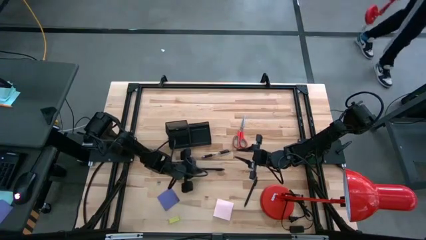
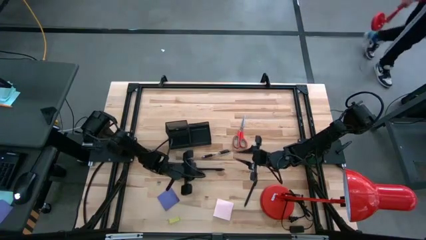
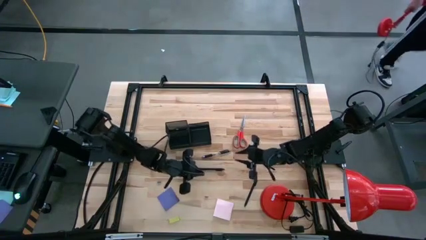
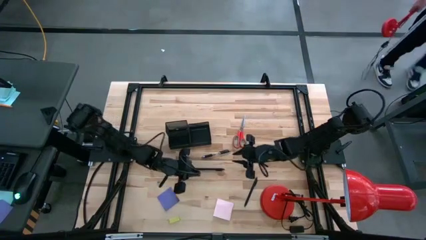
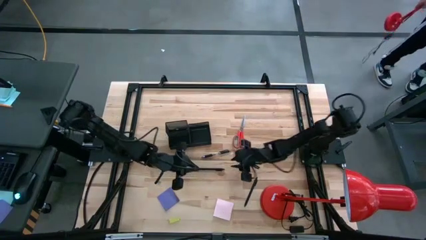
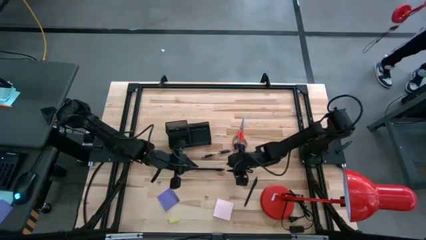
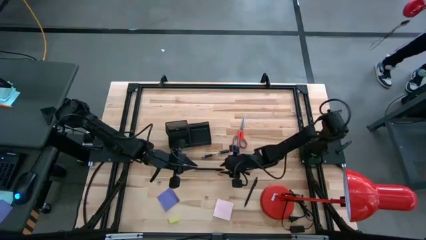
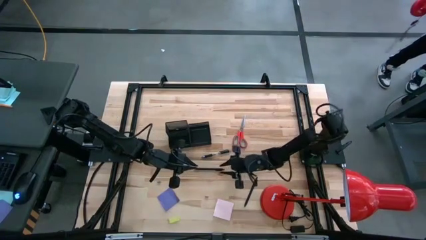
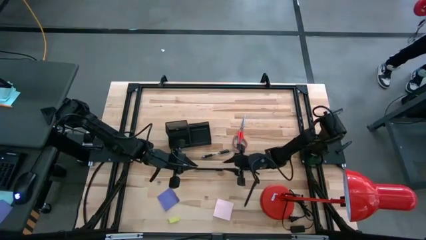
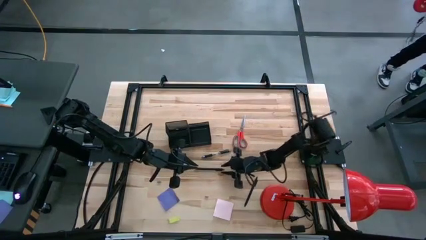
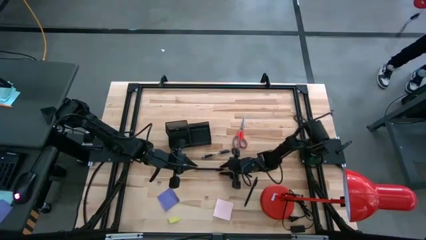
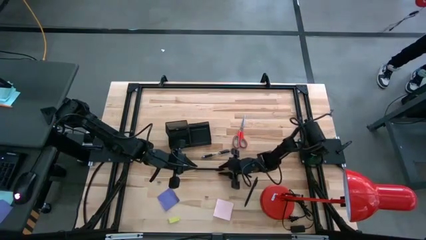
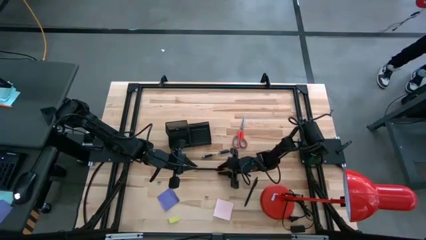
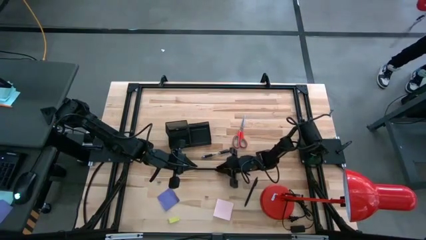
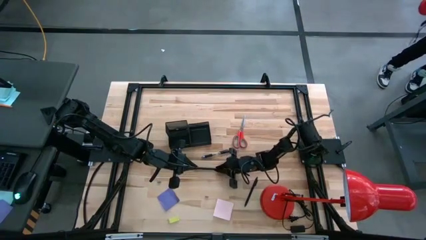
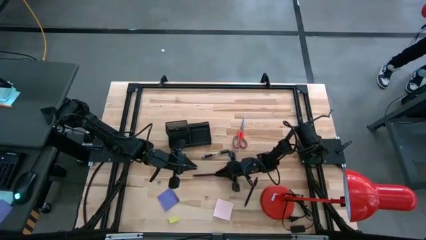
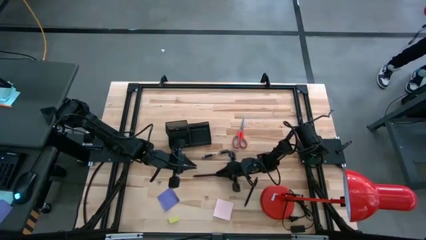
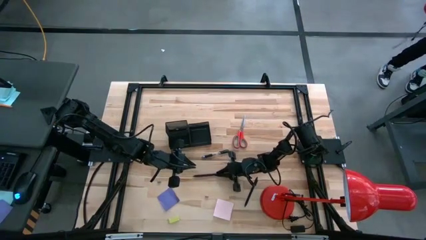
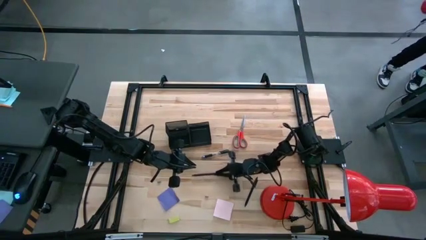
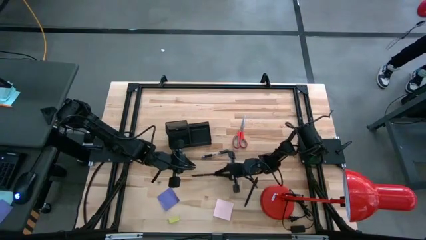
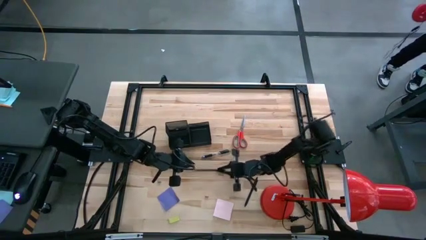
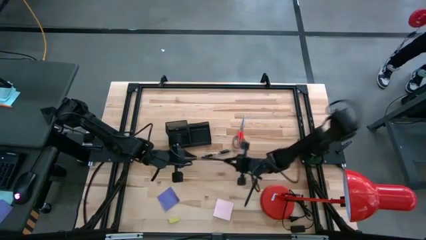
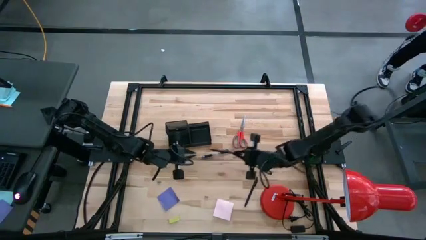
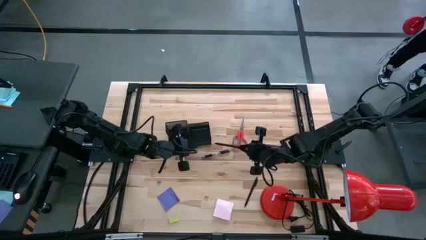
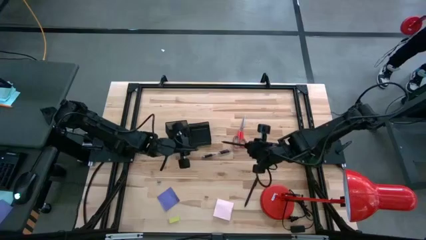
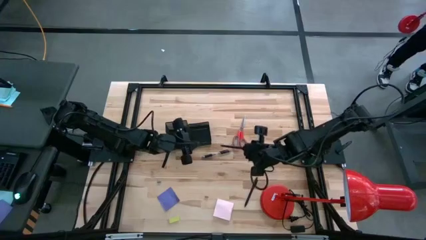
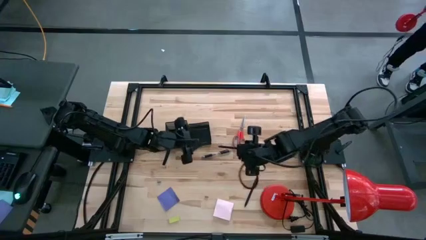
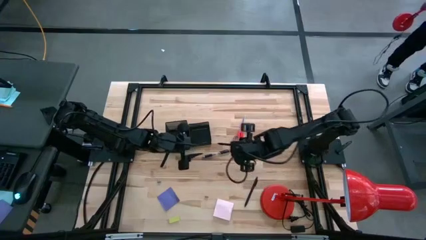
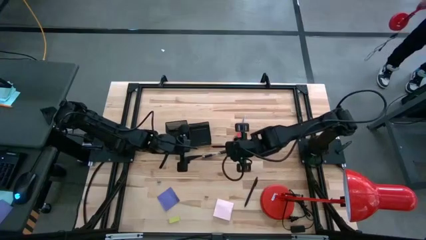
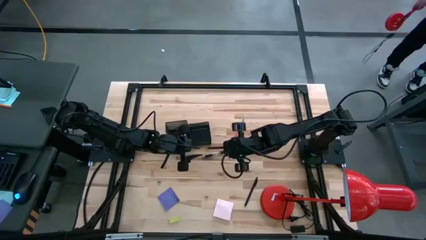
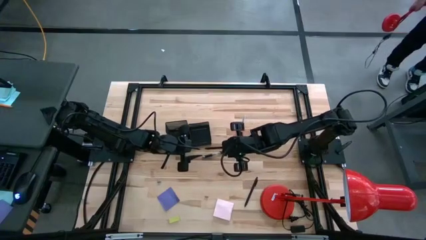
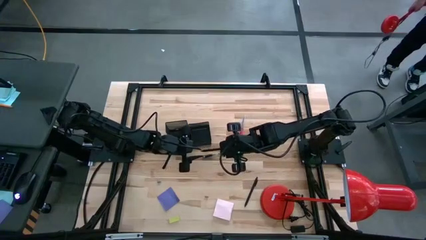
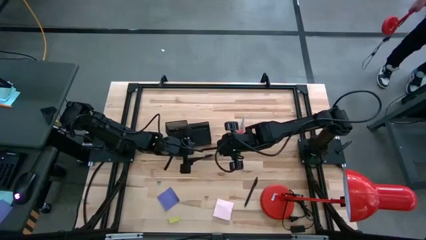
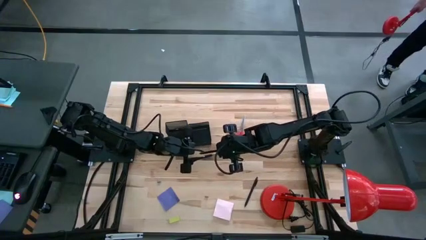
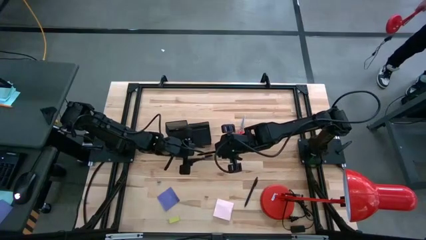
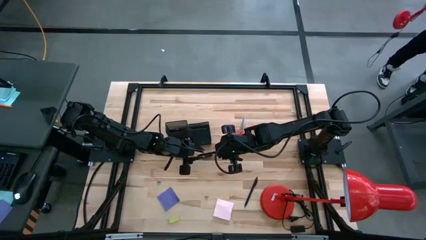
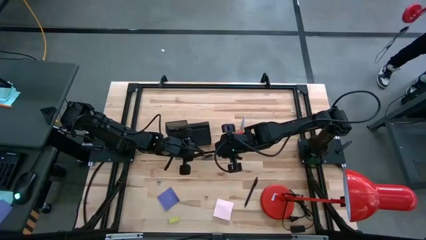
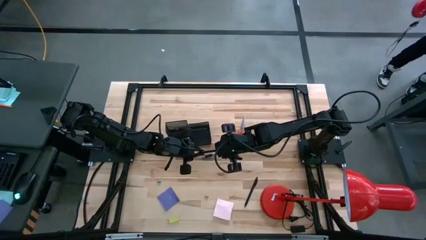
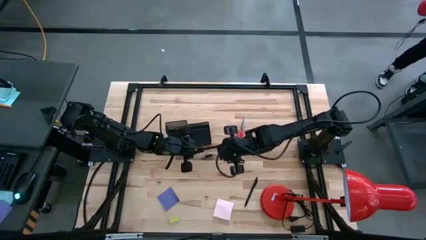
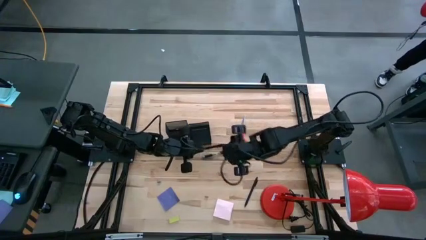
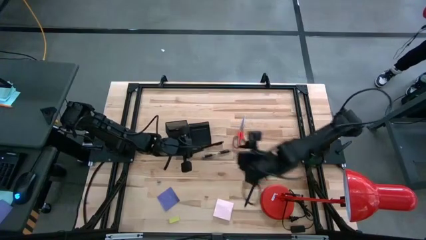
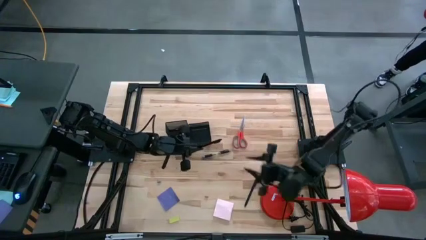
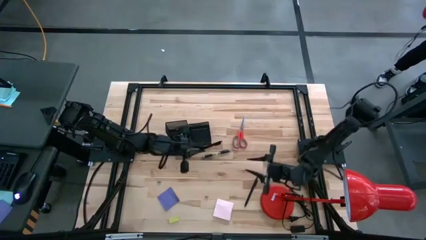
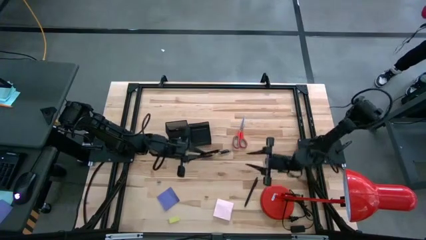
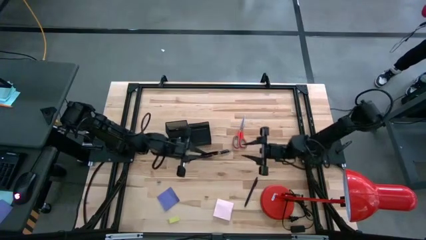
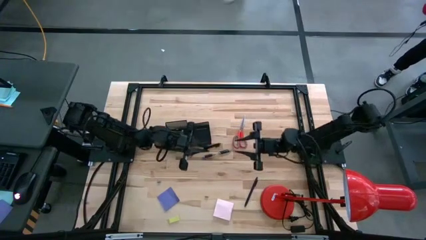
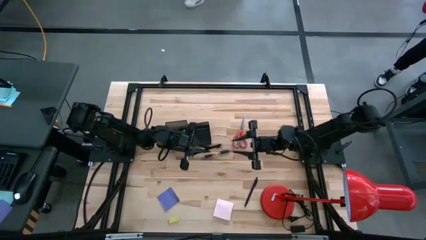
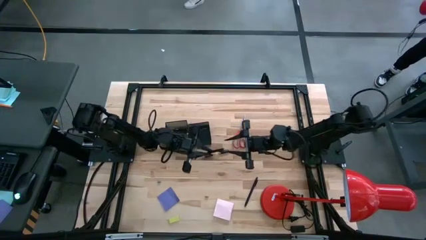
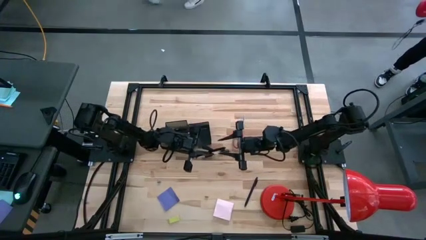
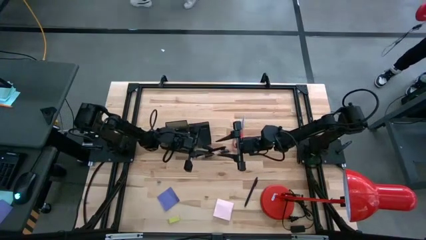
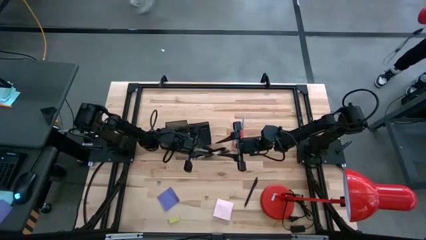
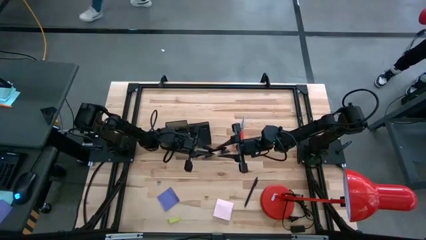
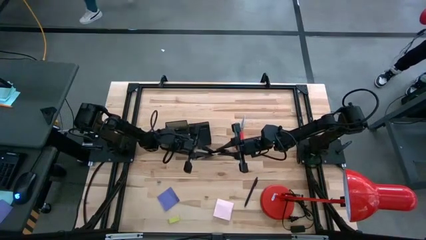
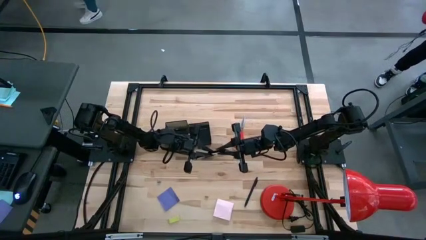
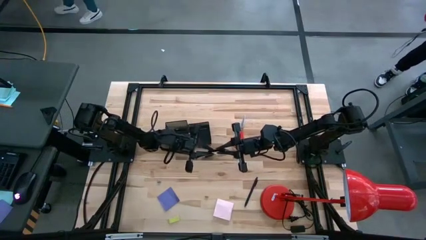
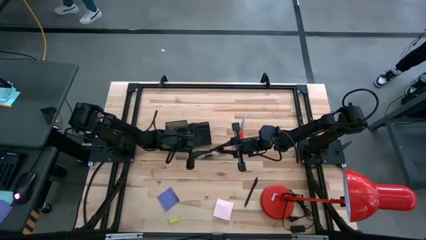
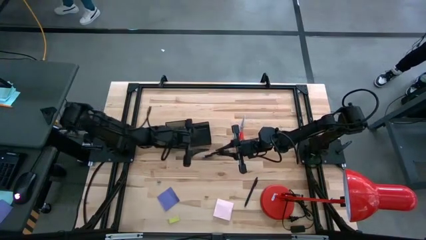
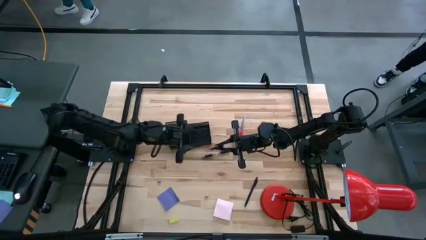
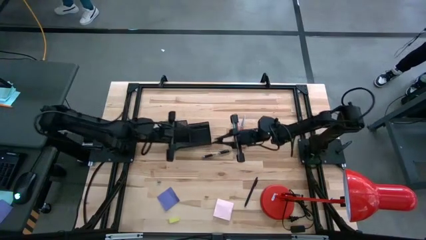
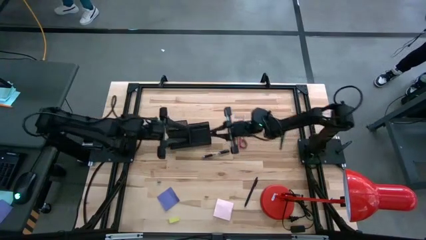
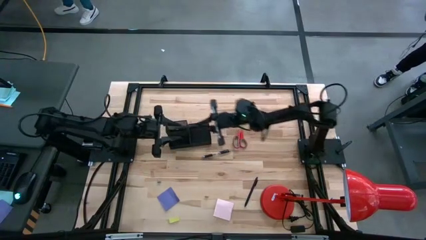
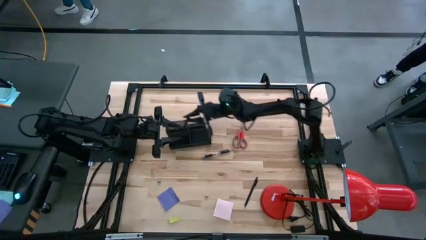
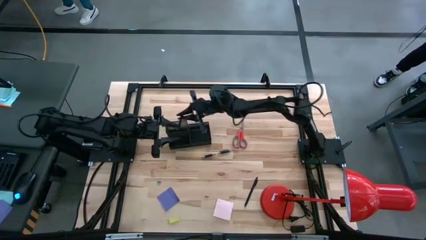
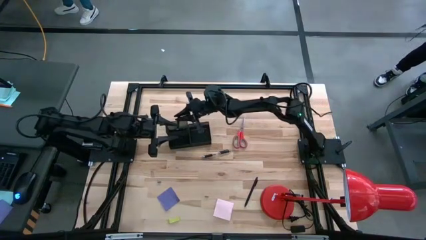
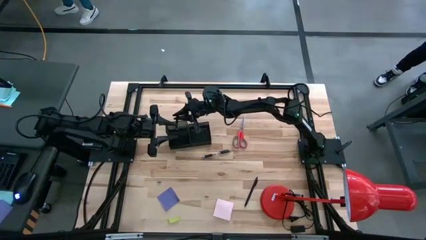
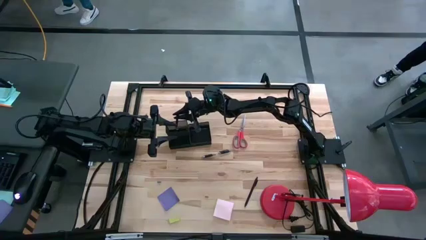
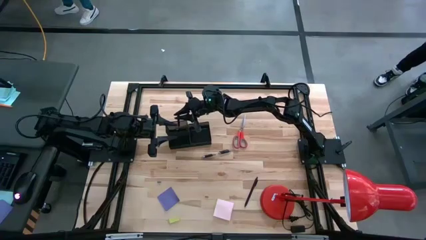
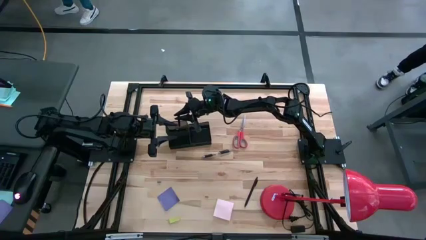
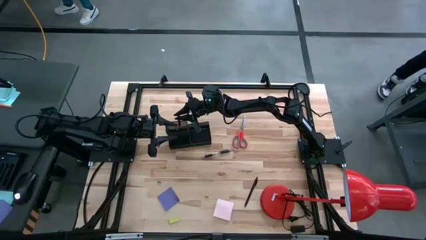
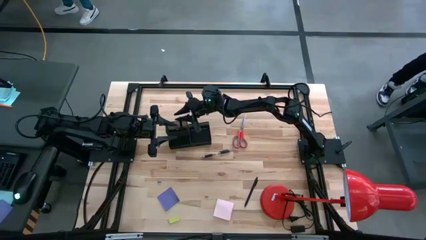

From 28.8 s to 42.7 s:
Task: Pick and place office supplies into organizer
Put top pen black into the desk organizer
